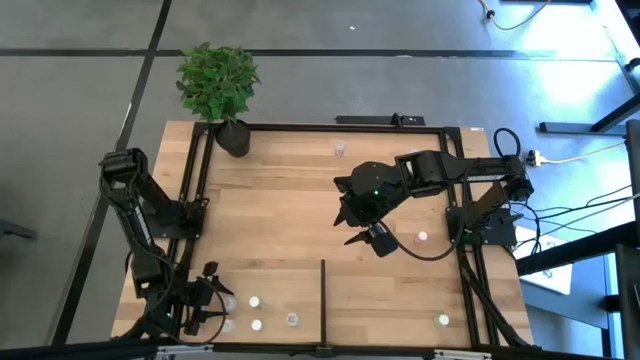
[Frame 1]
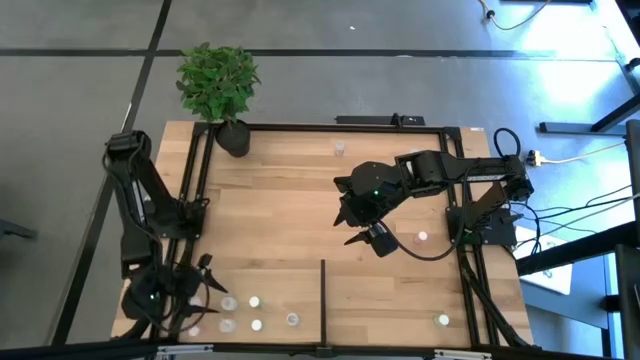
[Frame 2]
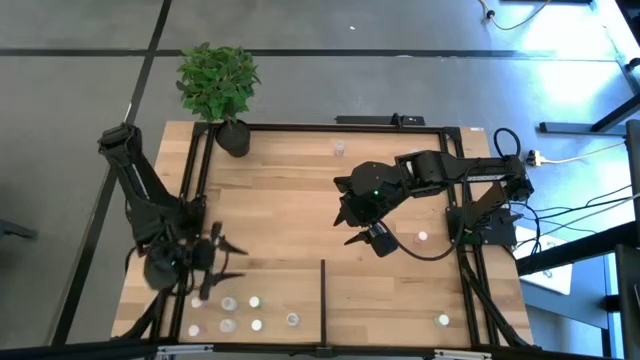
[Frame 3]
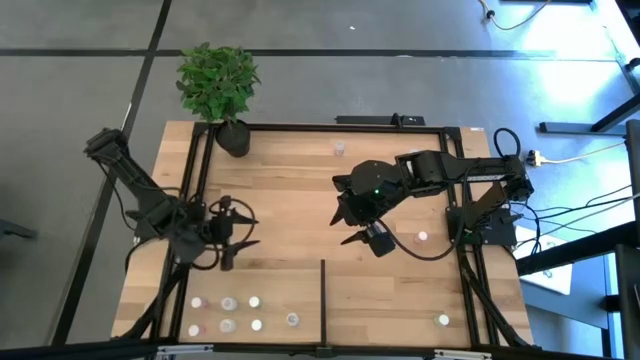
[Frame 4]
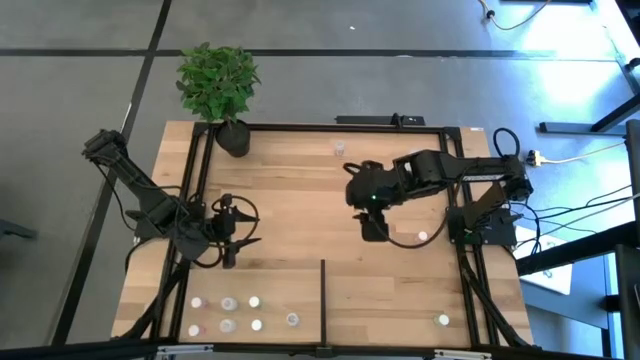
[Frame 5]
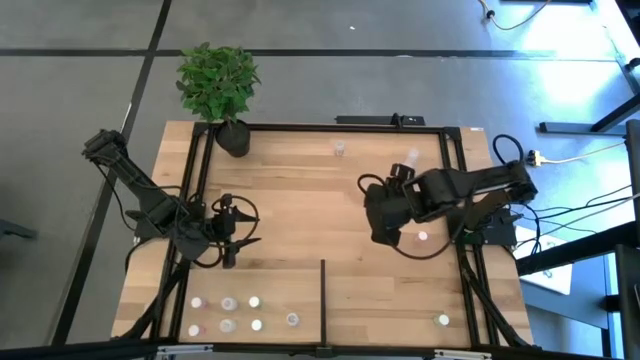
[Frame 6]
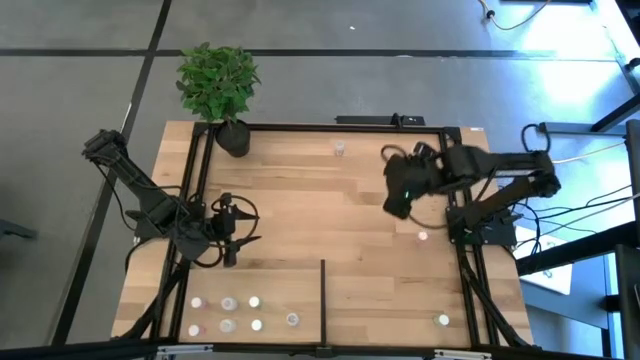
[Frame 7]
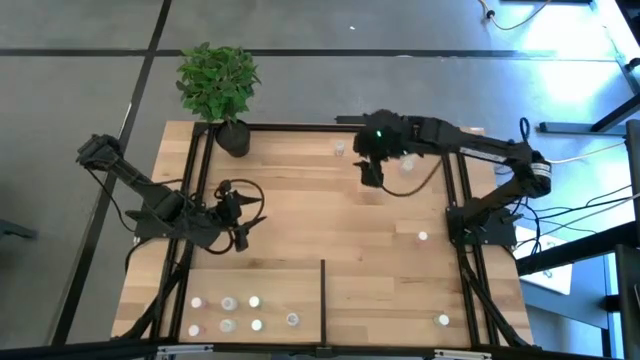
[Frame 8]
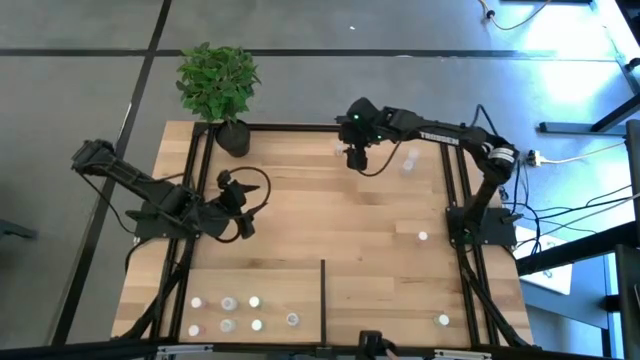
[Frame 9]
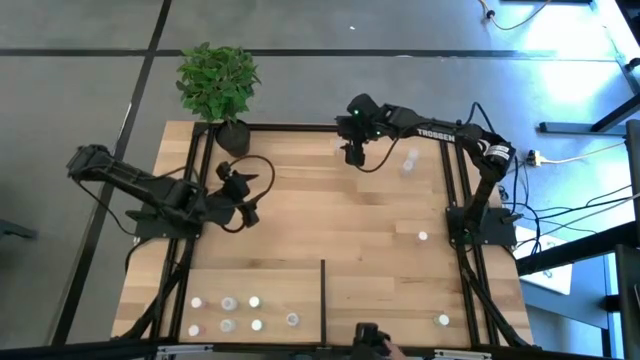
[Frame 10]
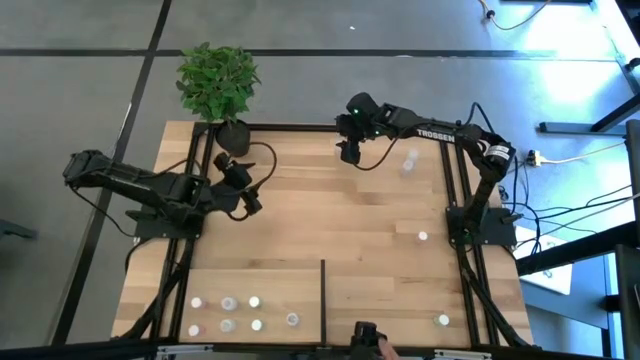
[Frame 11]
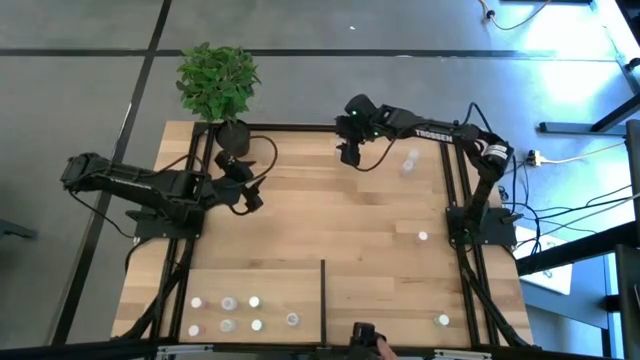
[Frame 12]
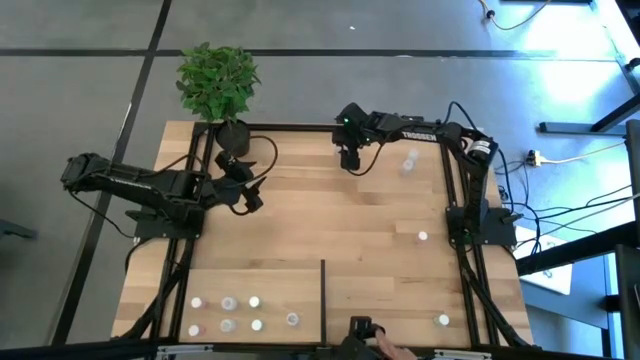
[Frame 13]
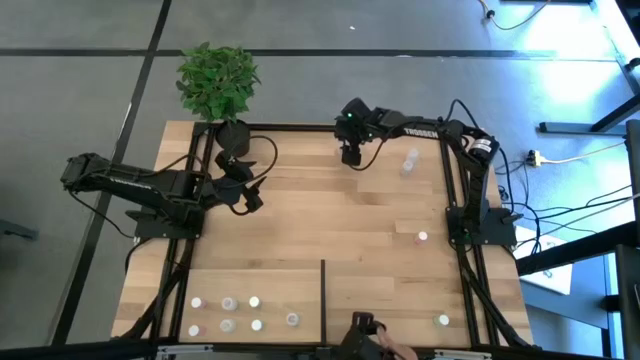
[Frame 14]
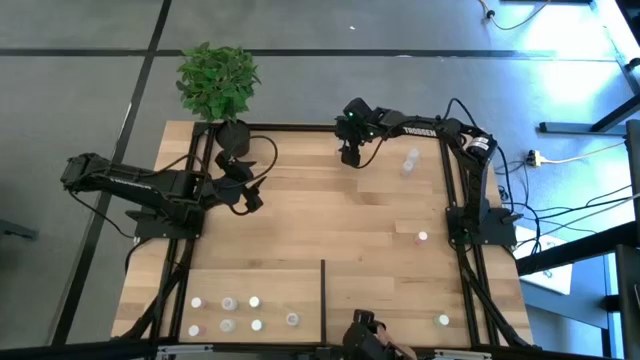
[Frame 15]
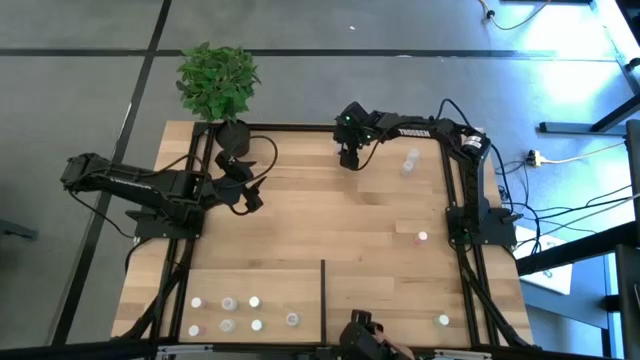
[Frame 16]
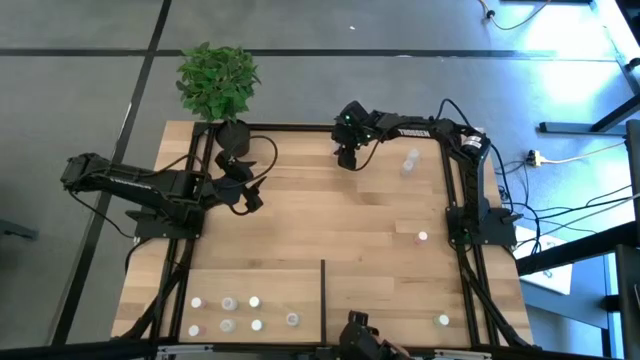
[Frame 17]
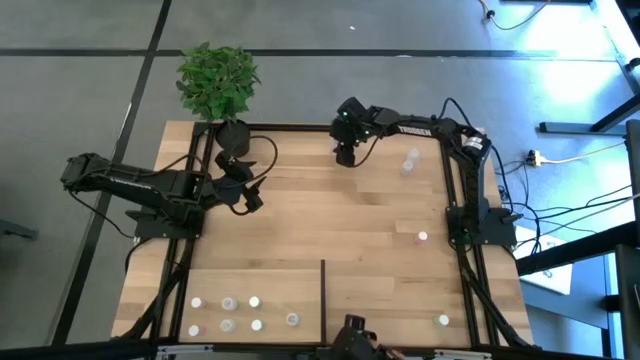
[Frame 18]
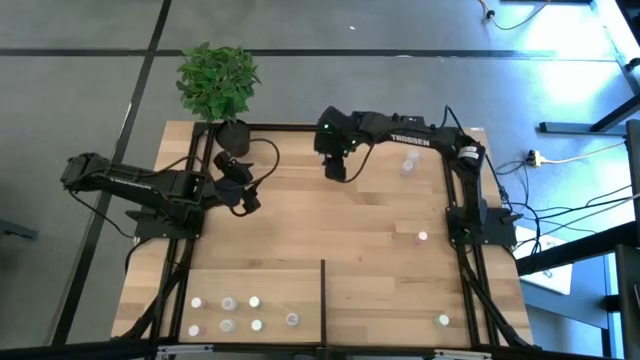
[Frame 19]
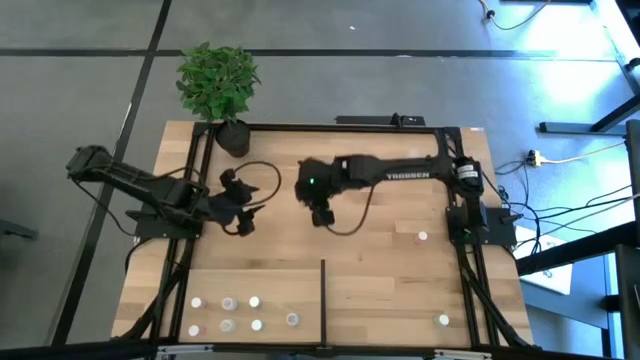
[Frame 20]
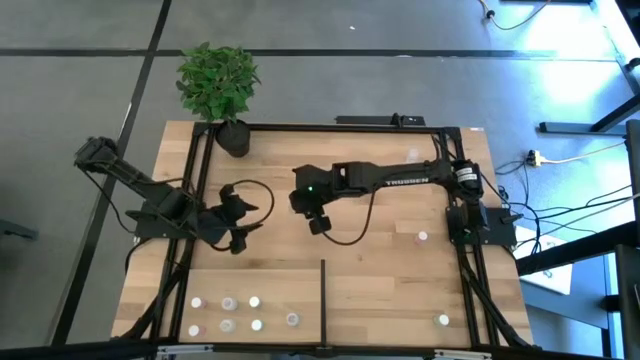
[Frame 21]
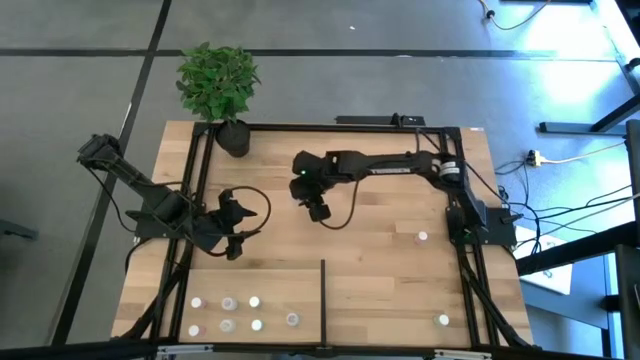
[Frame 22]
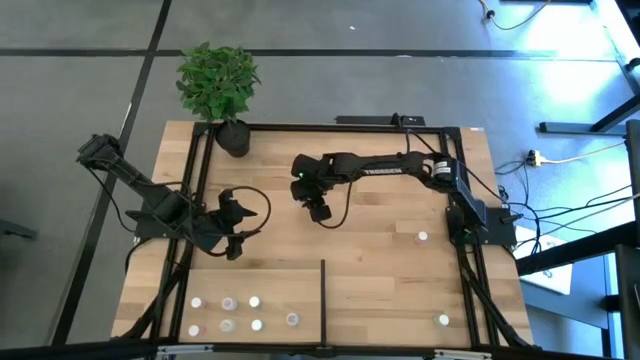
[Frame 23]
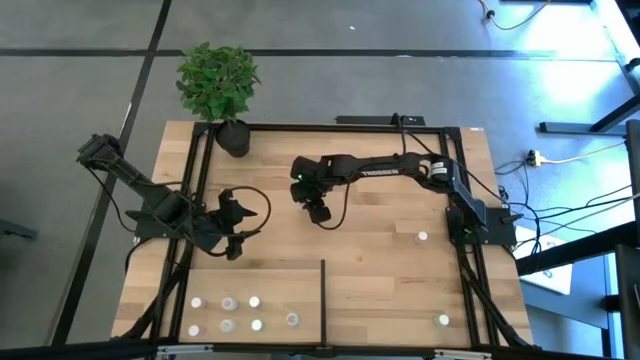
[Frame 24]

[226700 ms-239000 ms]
Task: Pick and place medicine bottles onto shelf by color
Put the left transparent pill bottle on the shelf aligned with the other transparent pill bottle

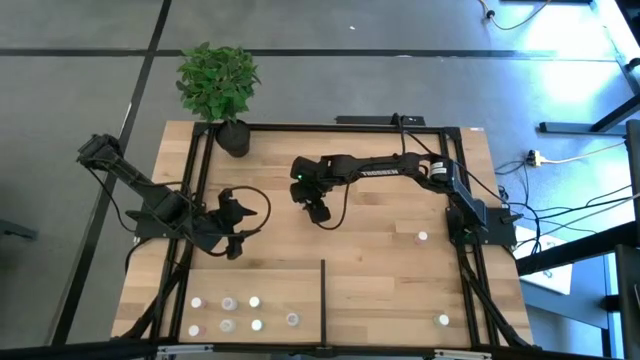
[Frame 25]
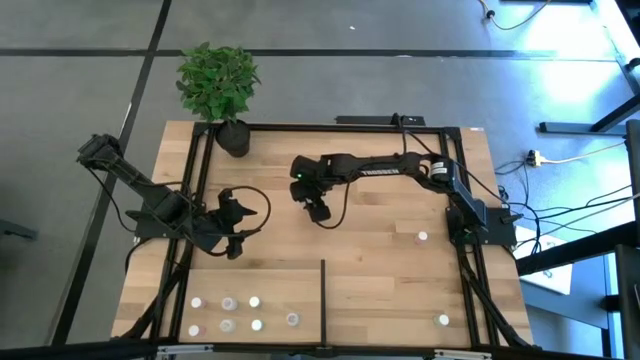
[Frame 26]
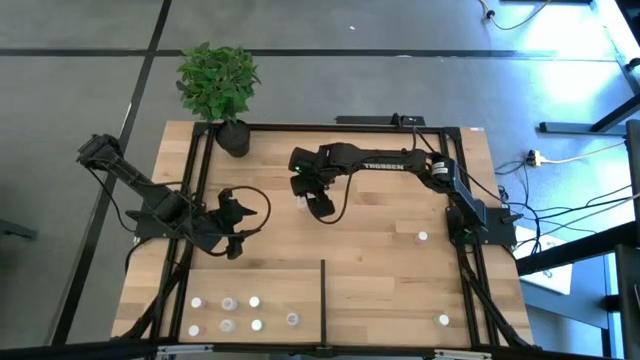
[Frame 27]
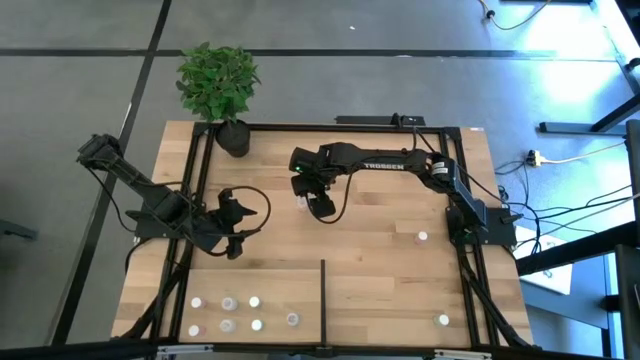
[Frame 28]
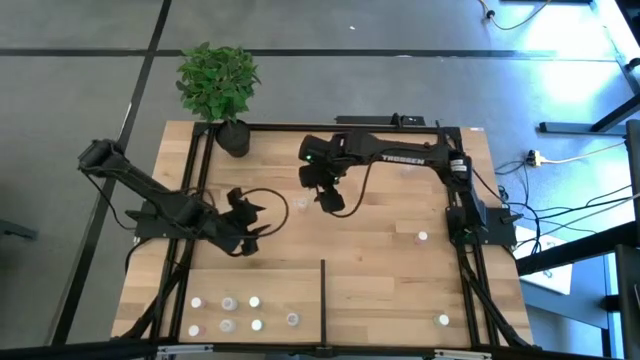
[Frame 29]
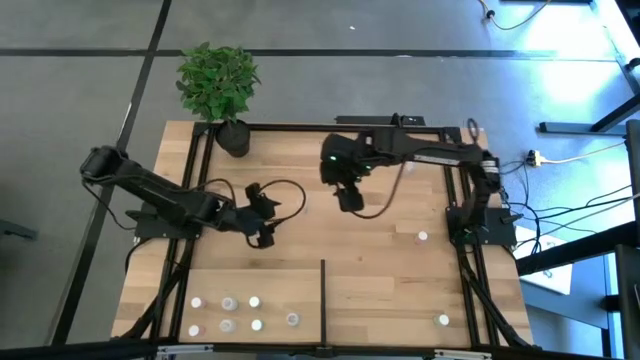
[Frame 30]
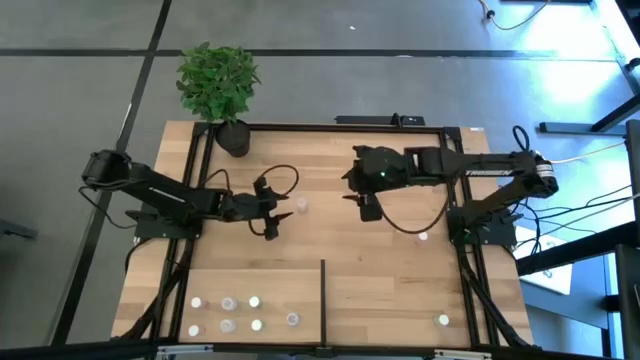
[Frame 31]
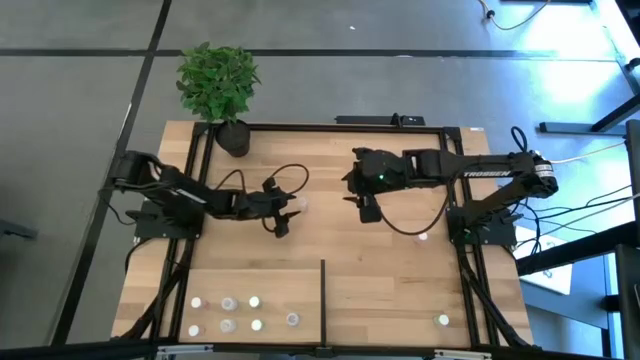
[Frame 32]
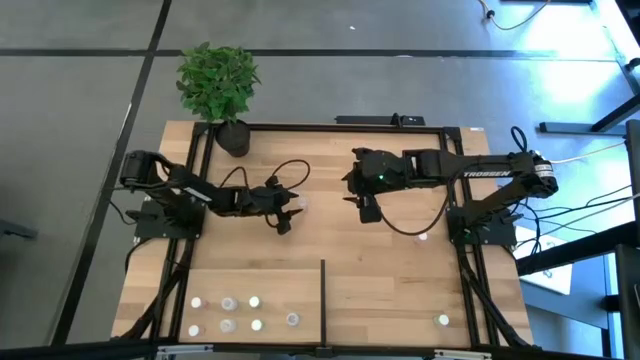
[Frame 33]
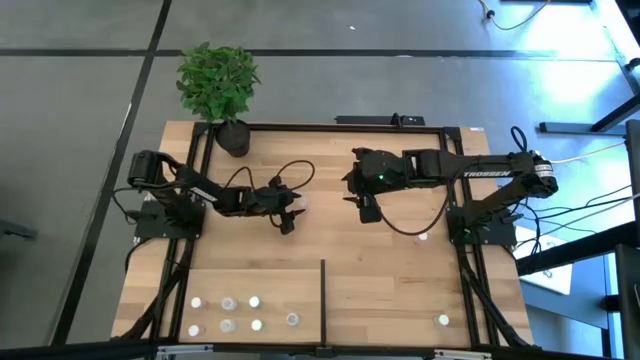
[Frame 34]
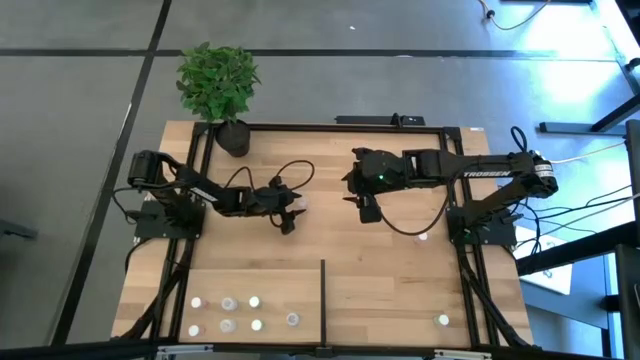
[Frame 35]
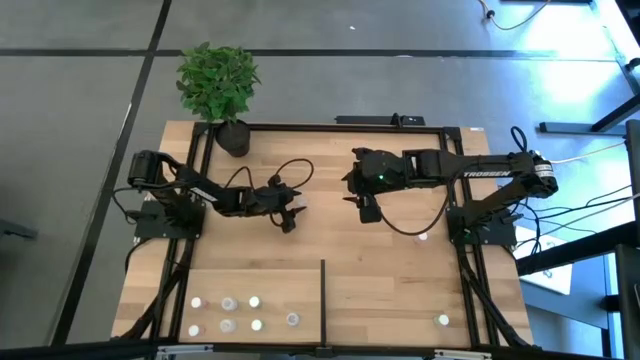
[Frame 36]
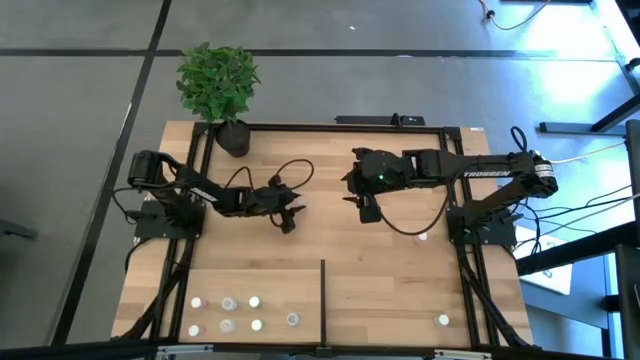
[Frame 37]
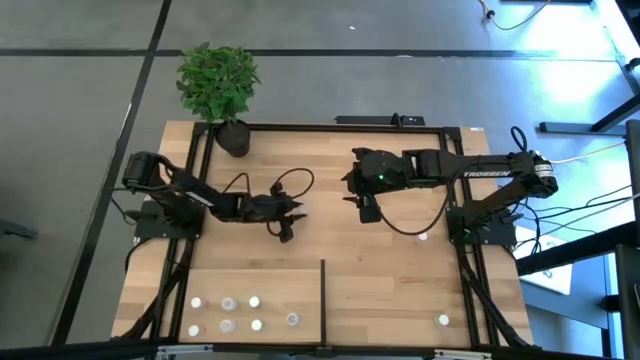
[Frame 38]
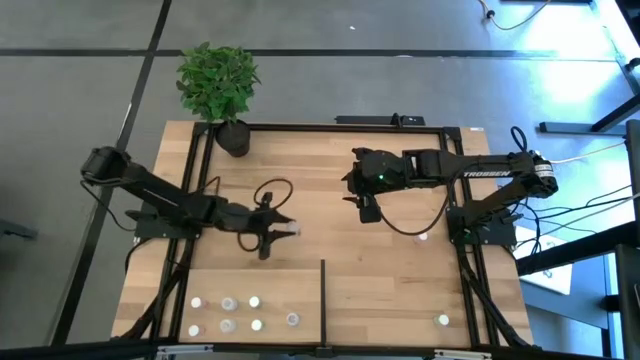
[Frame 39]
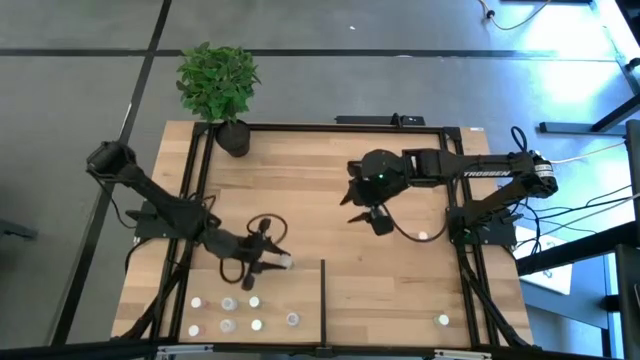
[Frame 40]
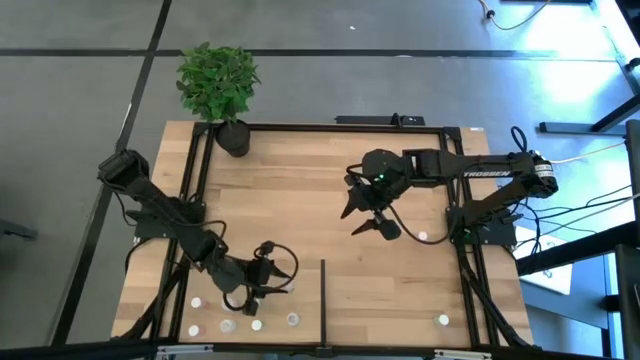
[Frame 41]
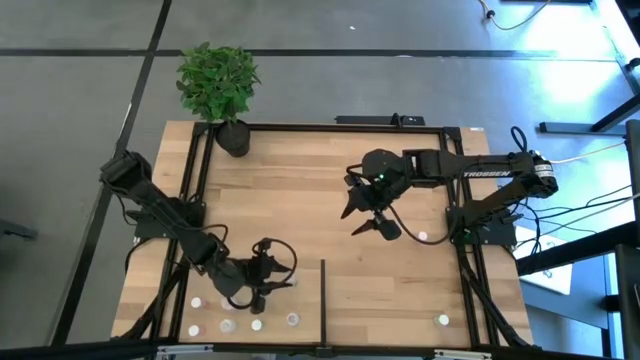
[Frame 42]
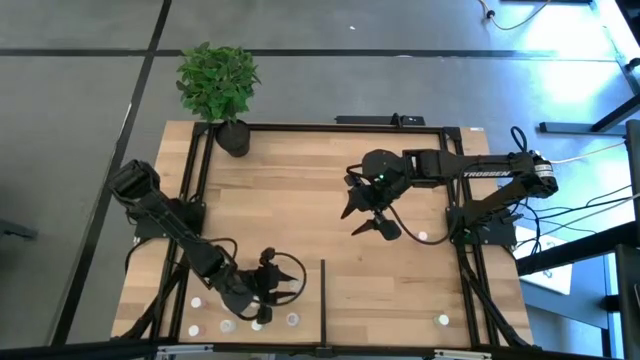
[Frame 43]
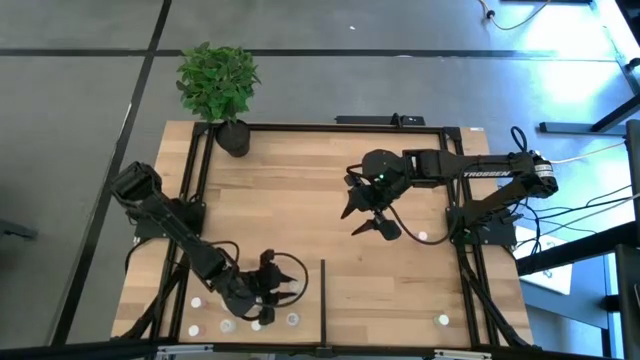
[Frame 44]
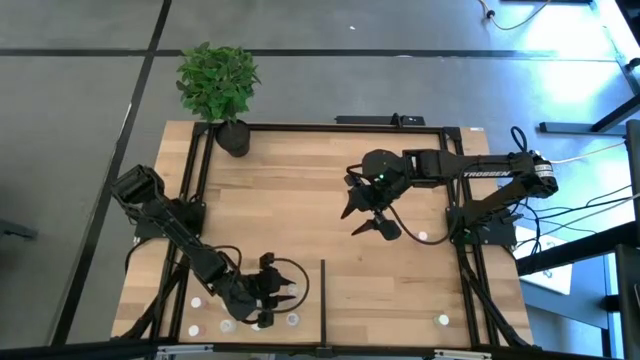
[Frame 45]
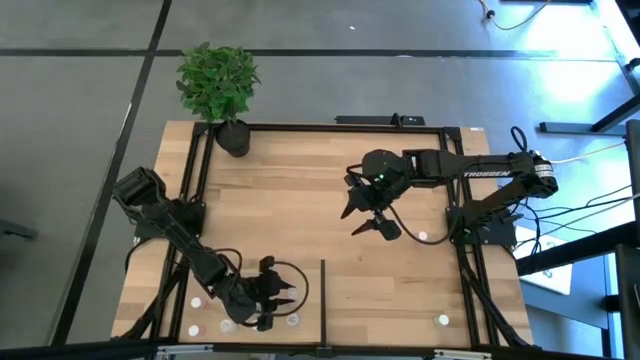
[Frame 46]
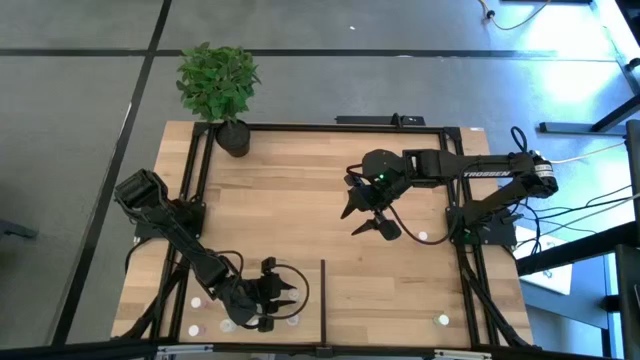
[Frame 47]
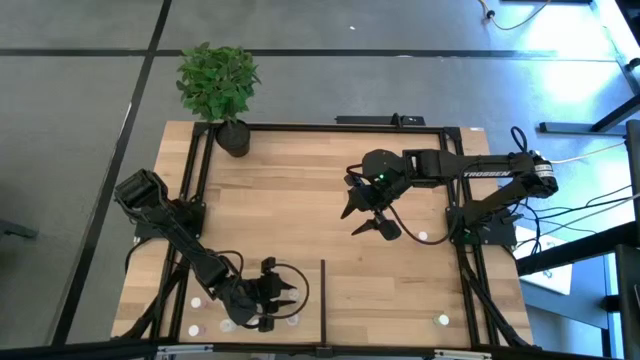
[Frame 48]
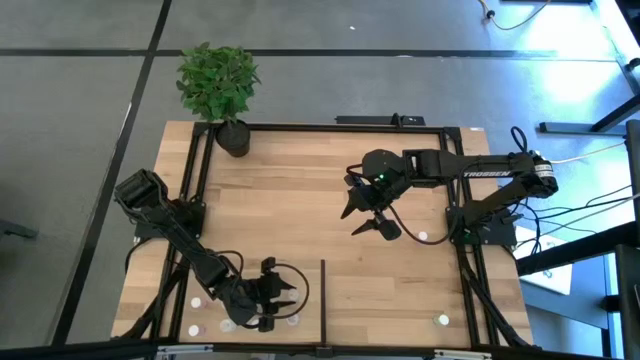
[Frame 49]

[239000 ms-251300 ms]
Put the left transparent pill bottle on the shelf aligned with the other transparent pill bottle
